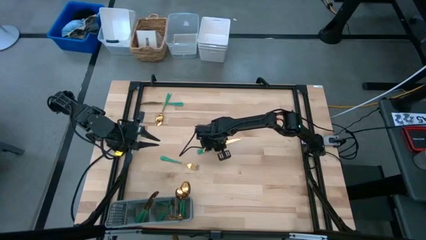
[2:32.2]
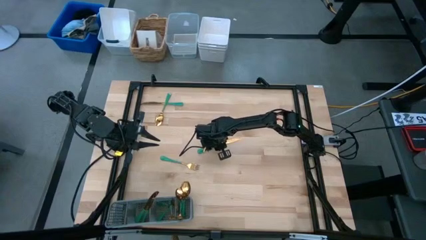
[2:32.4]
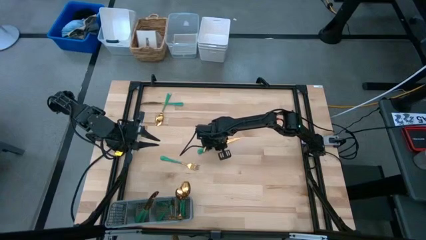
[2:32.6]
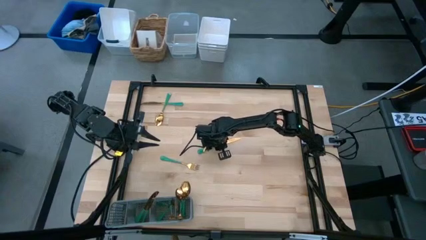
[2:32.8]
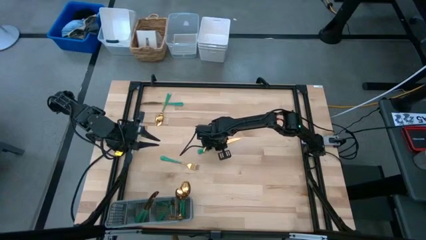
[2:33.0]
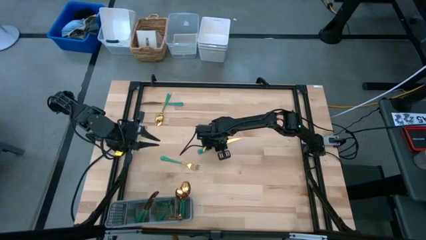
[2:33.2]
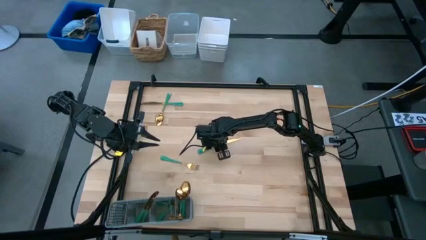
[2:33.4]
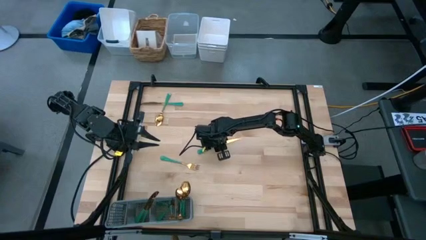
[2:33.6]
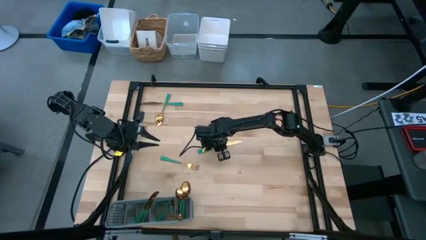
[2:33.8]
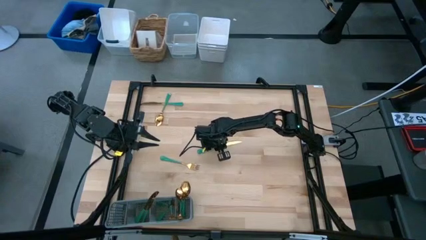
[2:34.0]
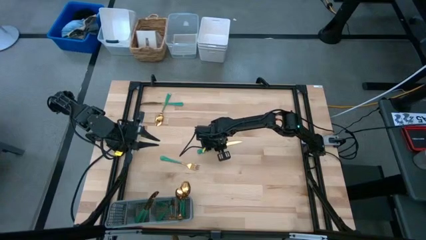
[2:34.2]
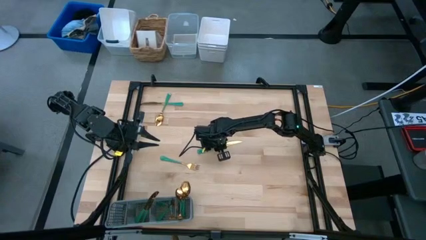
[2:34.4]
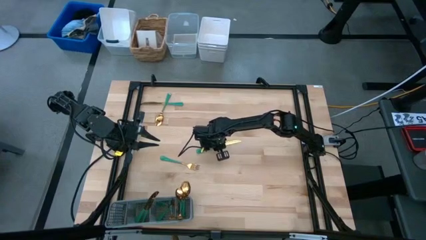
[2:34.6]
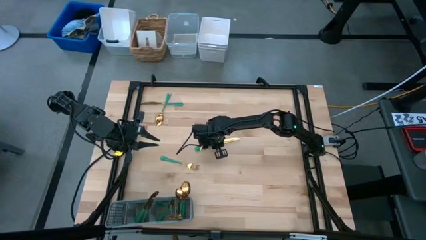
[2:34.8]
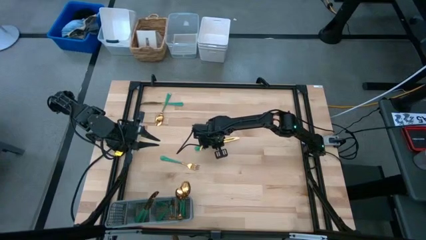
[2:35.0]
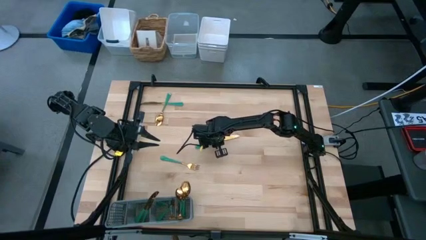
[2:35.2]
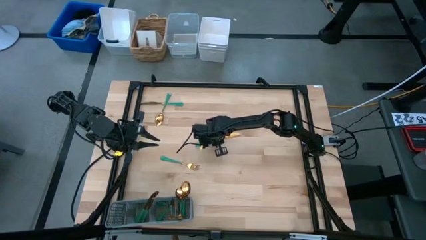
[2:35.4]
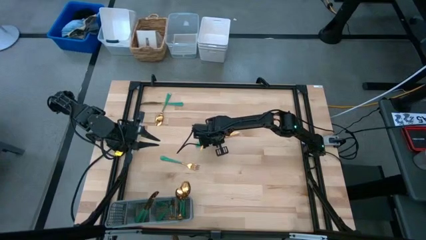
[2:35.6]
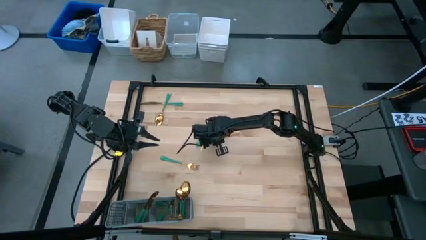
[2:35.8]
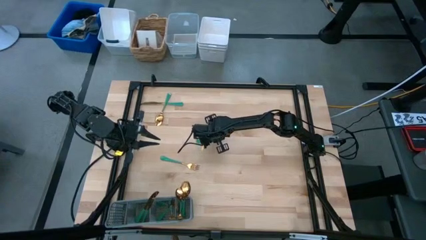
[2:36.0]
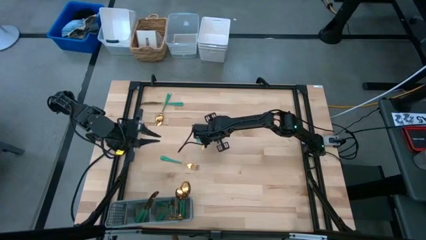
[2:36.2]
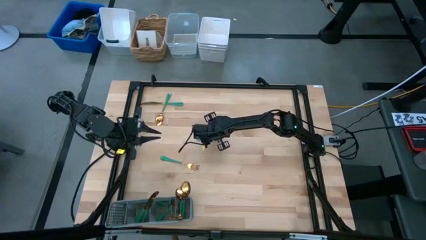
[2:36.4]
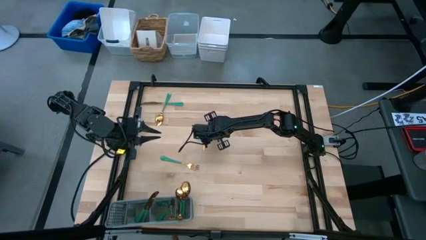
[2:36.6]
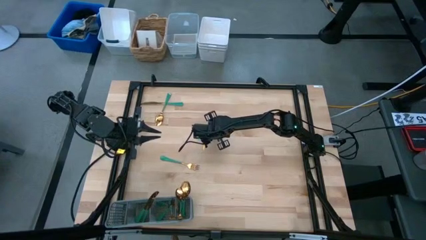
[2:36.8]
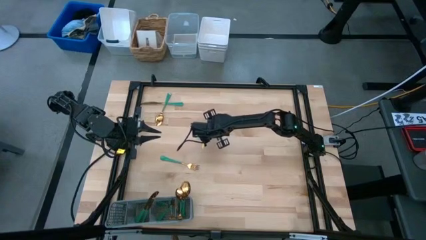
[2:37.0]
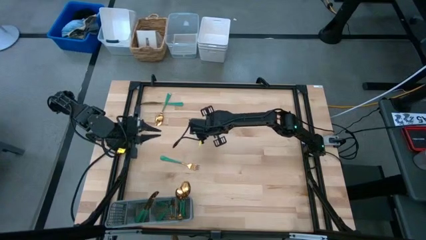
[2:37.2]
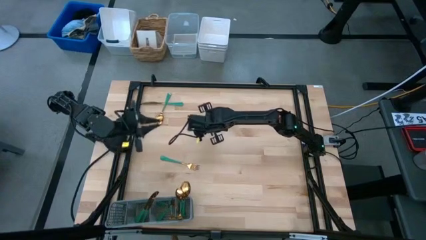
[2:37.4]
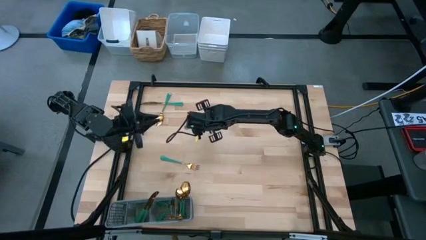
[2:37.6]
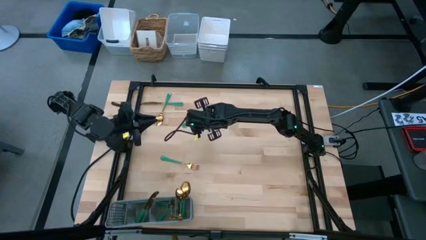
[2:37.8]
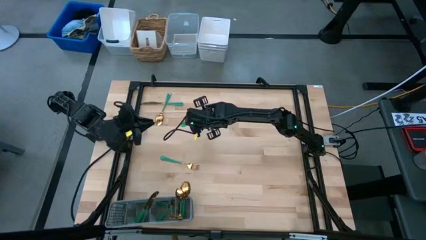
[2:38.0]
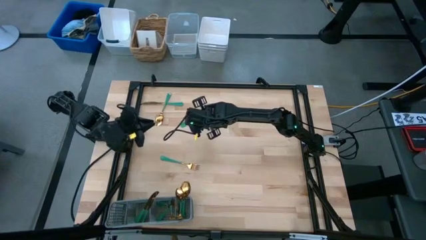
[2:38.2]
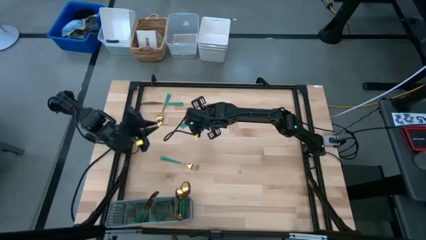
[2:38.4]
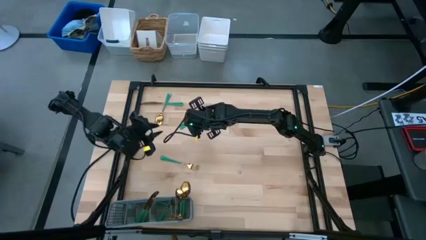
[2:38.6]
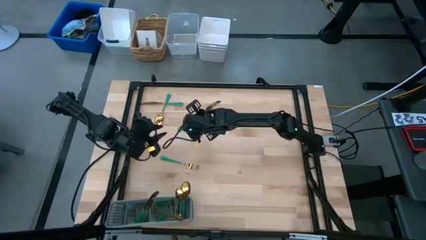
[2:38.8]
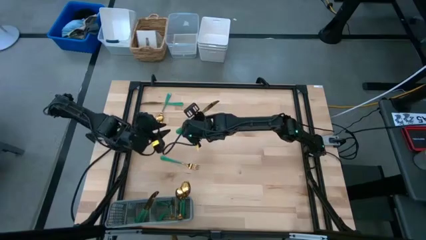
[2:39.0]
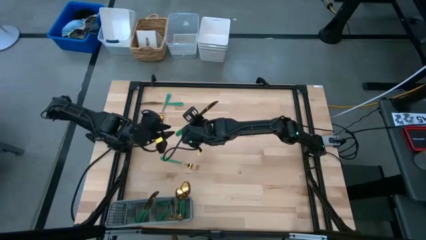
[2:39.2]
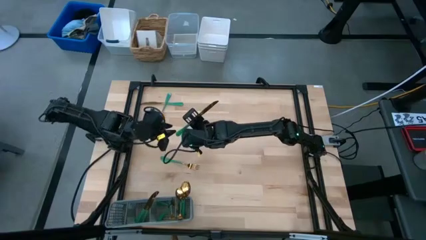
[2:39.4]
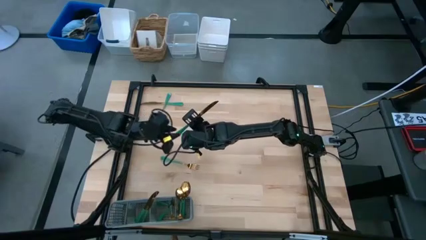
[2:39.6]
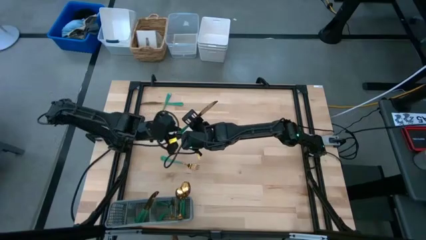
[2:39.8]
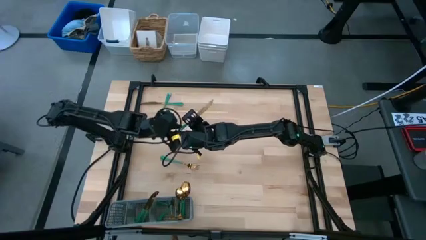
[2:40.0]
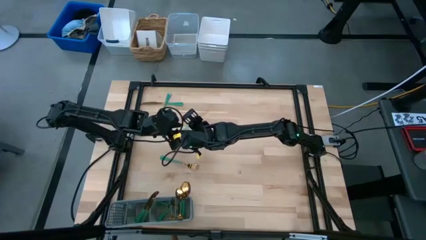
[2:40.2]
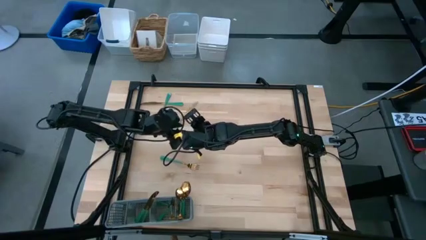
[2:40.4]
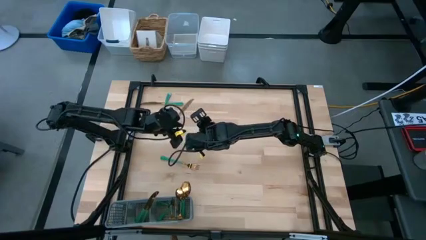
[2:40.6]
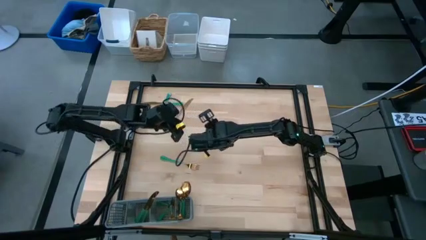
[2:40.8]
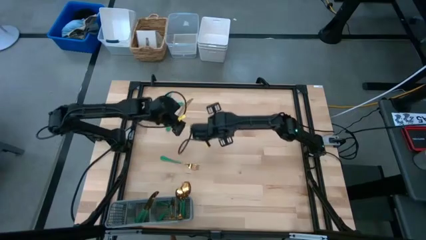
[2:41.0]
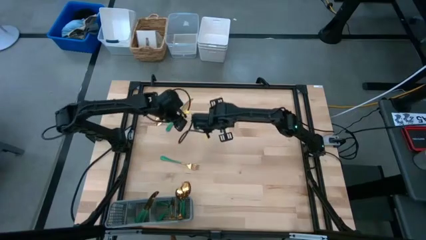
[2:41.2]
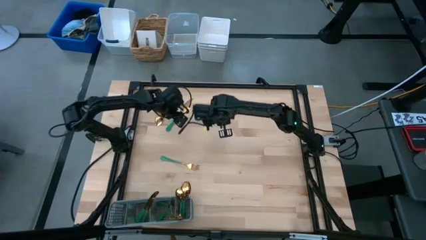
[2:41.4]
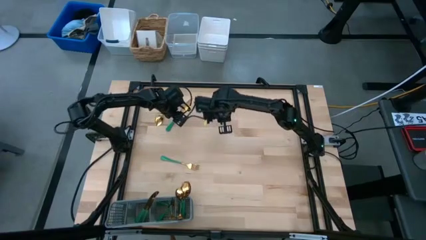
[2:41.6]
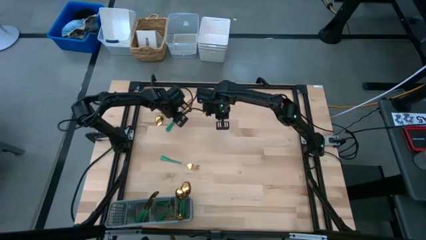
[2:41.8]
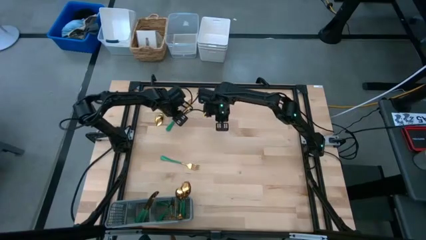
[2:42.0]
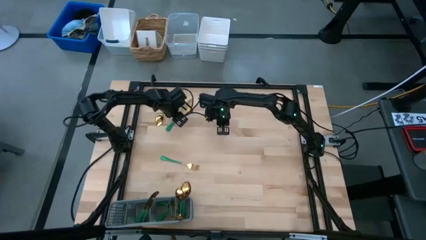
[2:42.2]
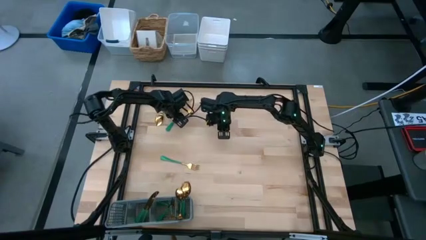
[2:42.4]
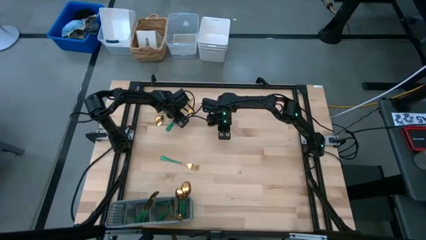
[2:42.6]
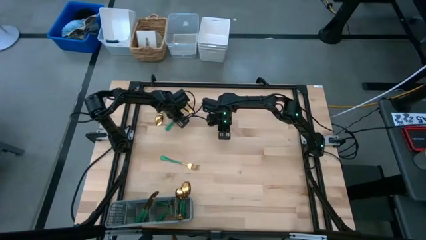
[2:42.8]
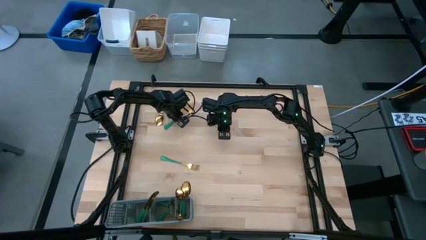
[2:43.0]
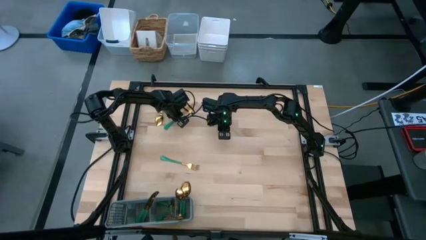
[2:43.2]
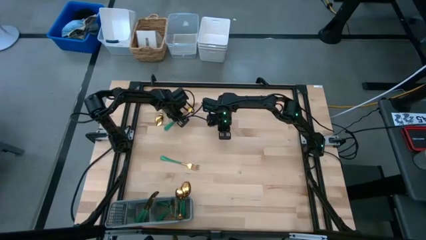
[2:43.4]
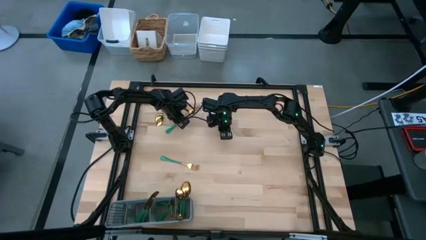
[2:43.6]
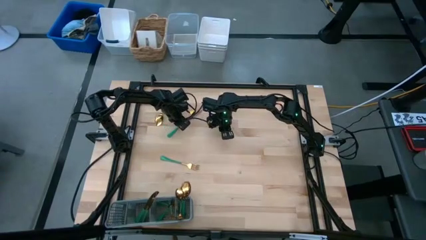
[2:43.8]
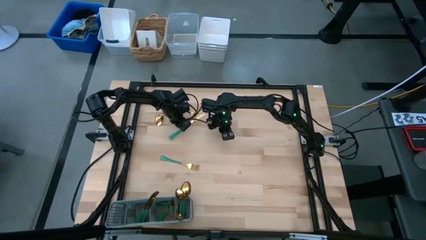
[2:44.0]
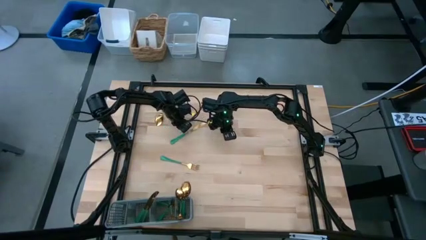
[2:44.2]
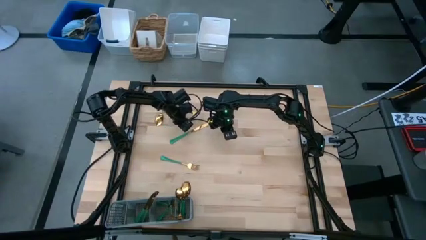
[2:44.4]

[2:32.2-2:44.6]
Task: Sort silverware
Put the bottom knife into the cutlery rack
